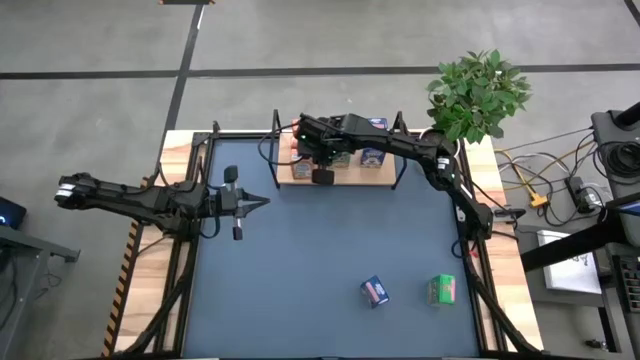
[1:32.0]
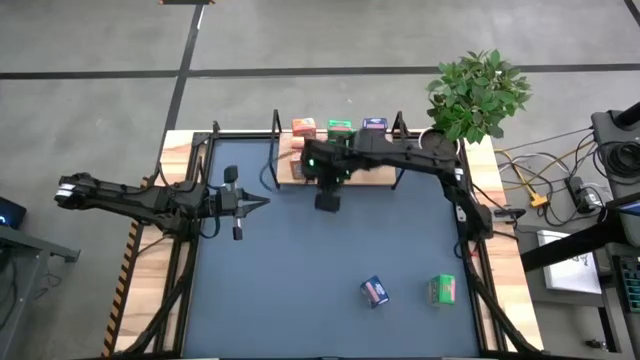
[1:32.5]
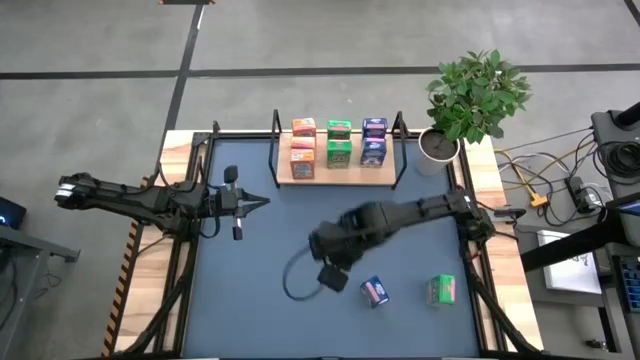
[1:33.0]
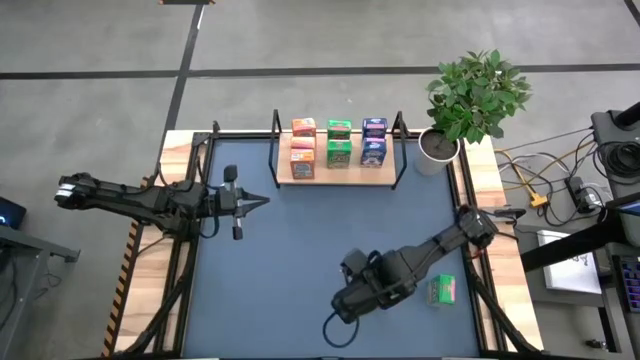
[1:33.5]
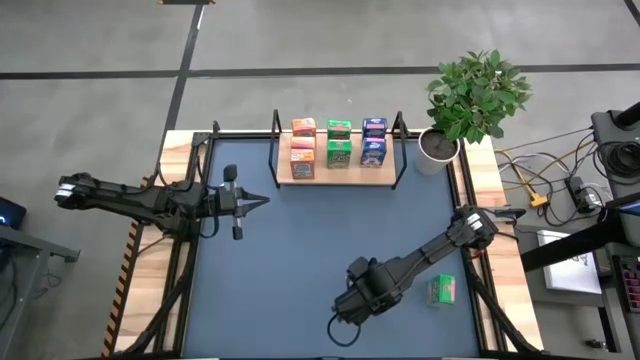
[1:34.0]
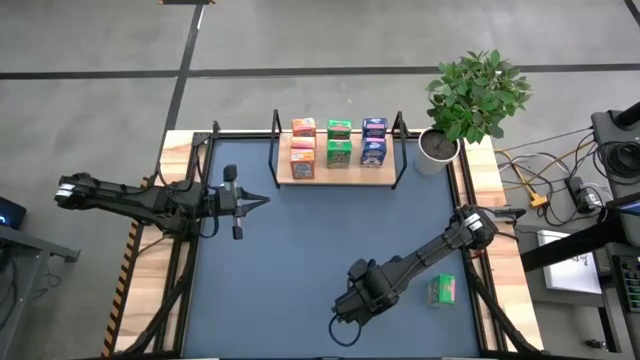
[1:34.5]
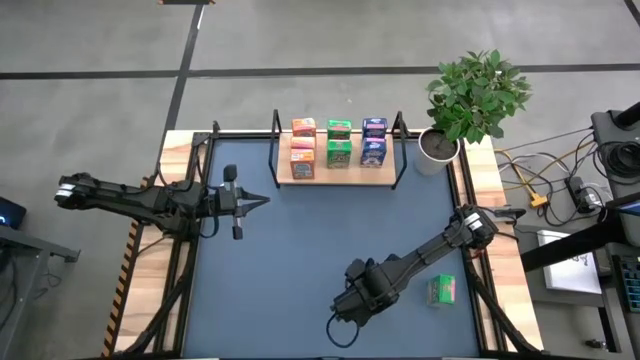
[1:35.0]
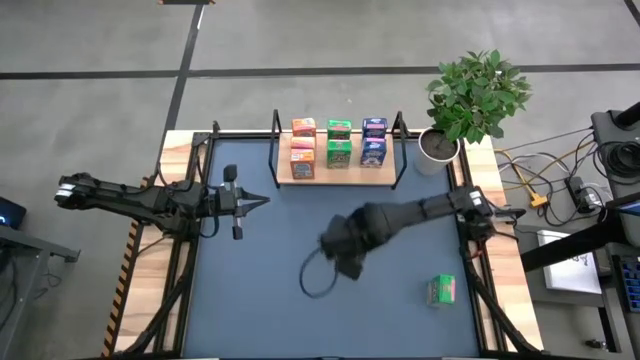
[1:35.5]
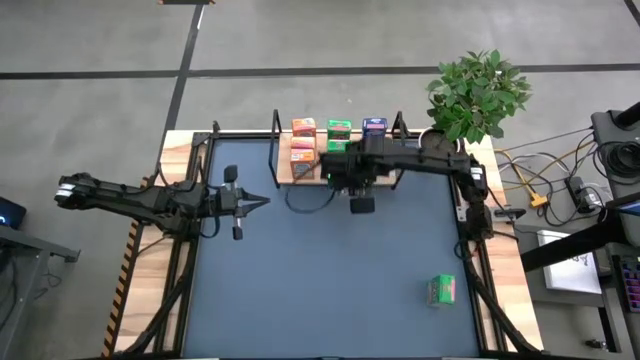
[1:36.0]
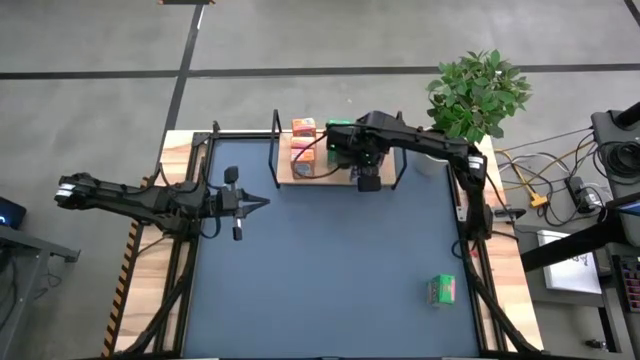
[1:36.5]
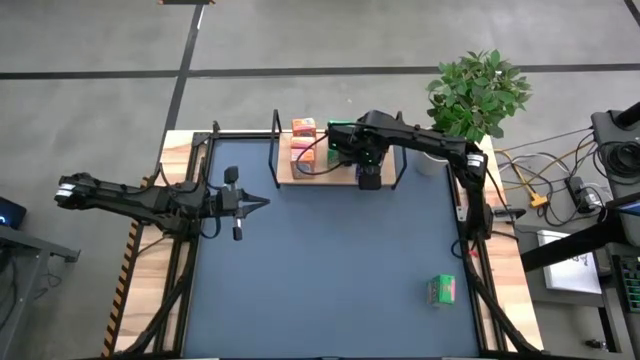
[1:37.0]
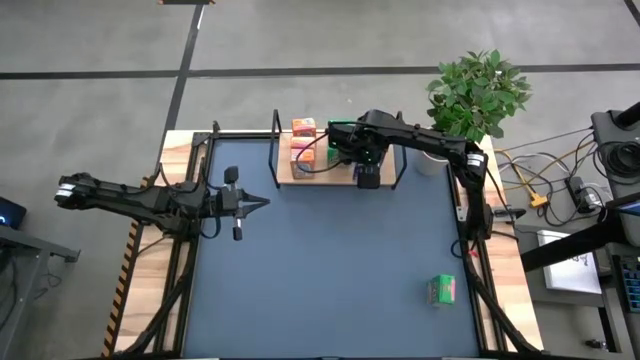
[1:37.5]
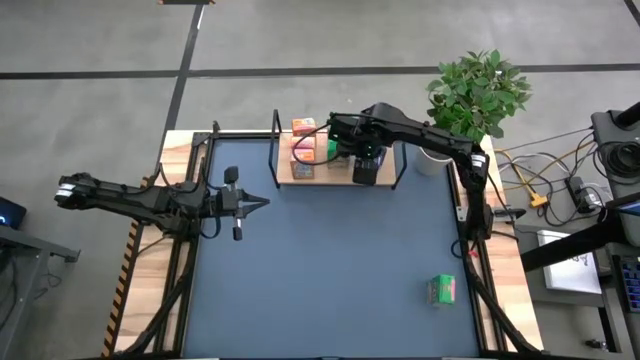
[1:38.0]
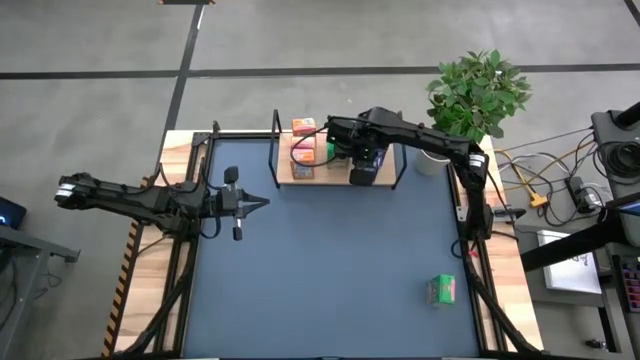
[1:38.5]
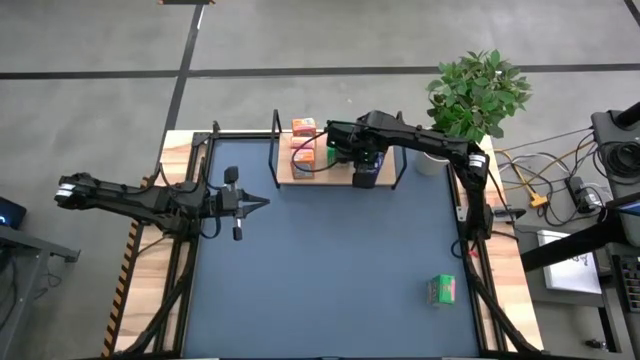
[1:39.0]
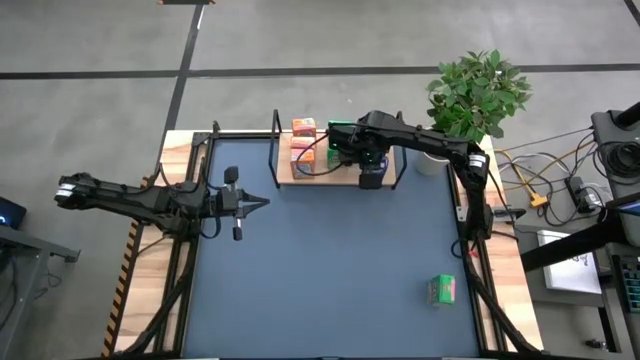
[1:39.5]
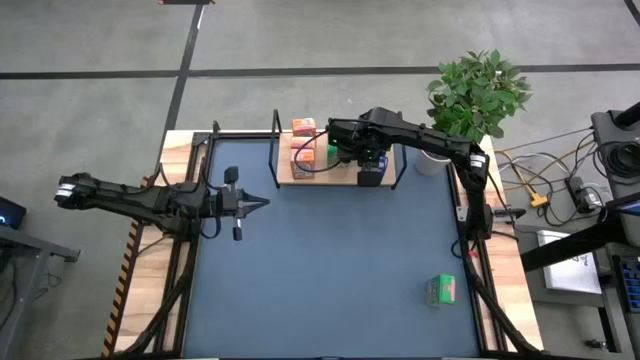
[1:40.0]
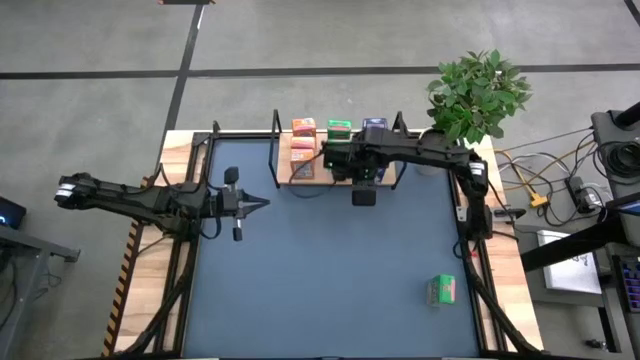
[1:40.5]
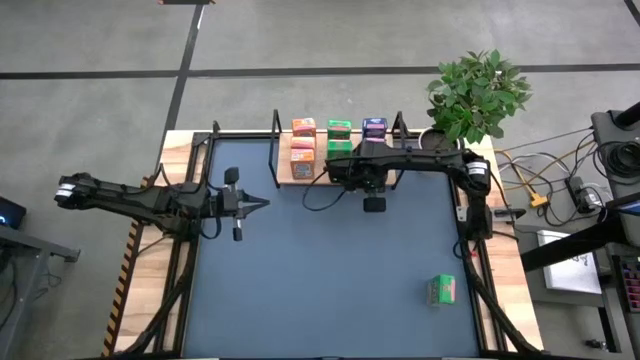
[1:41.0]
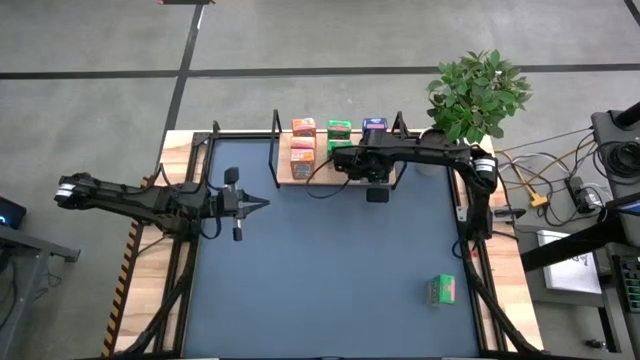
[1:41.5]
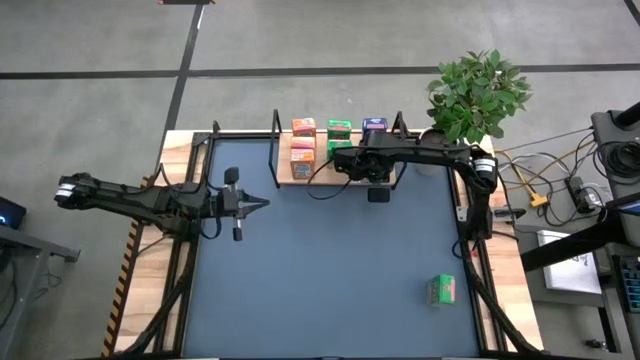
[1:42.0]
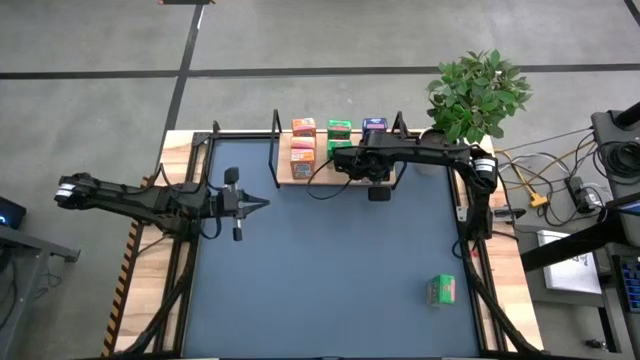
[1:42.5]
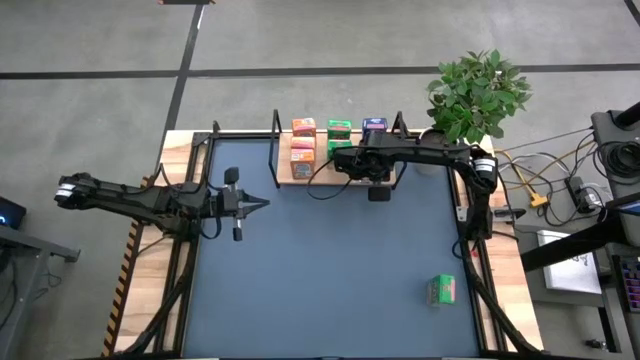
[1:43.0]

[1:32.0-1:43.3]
Task: Stack cereal on shelf
Put the blue cereal box on the shelf

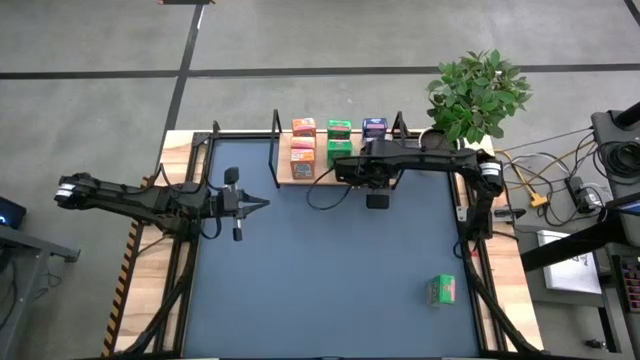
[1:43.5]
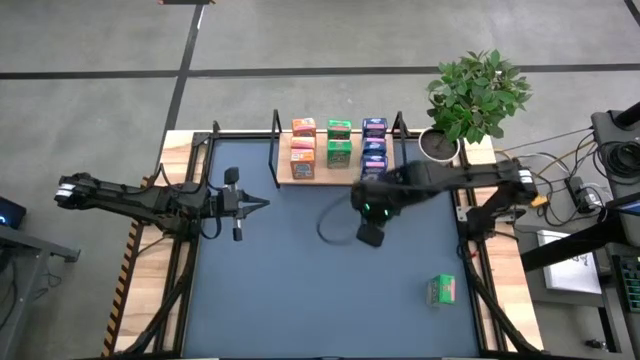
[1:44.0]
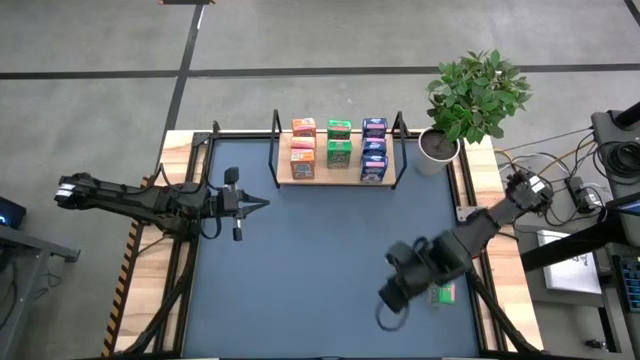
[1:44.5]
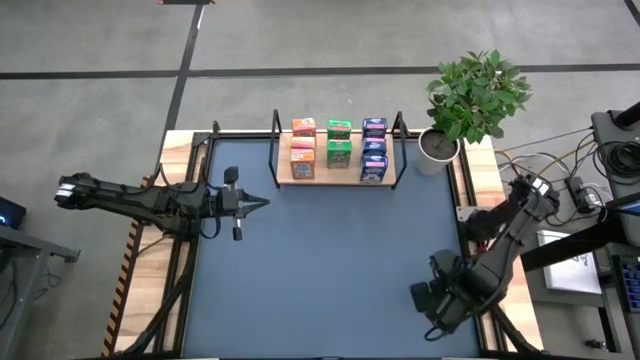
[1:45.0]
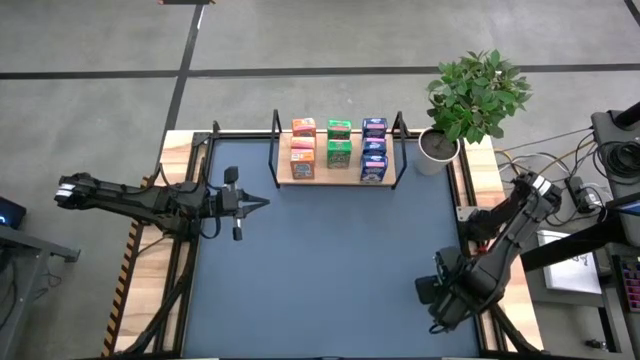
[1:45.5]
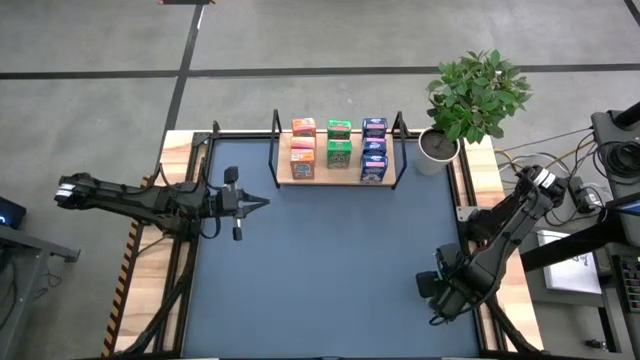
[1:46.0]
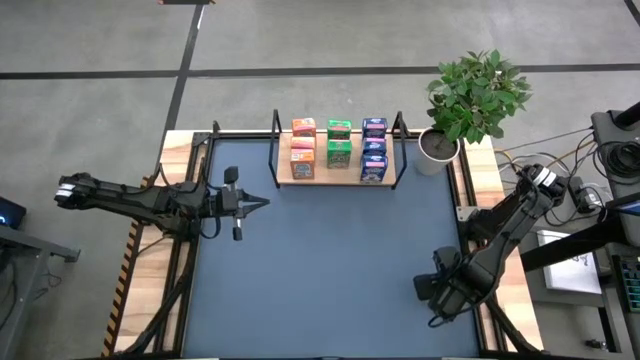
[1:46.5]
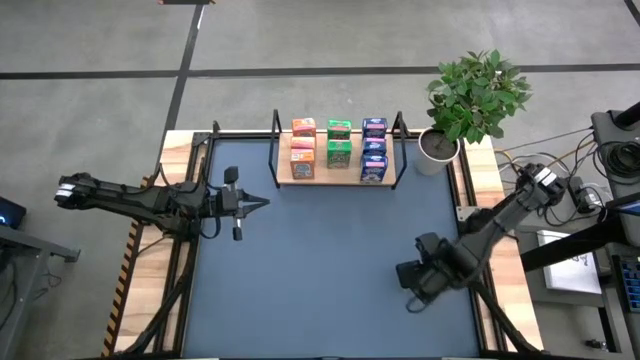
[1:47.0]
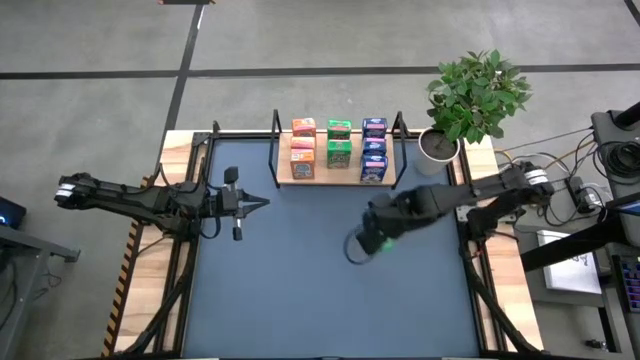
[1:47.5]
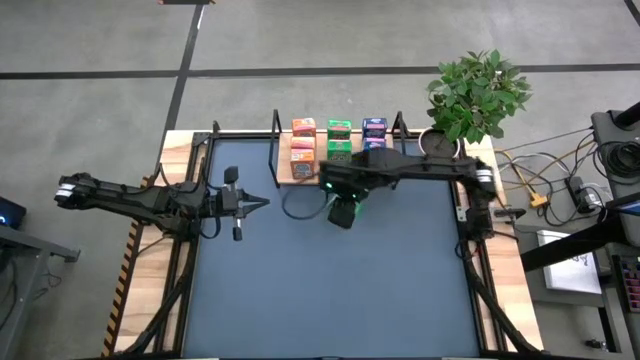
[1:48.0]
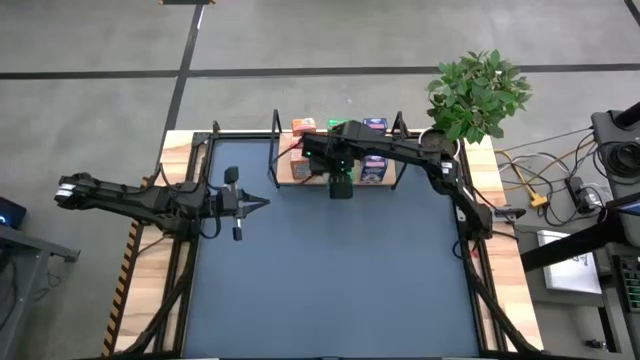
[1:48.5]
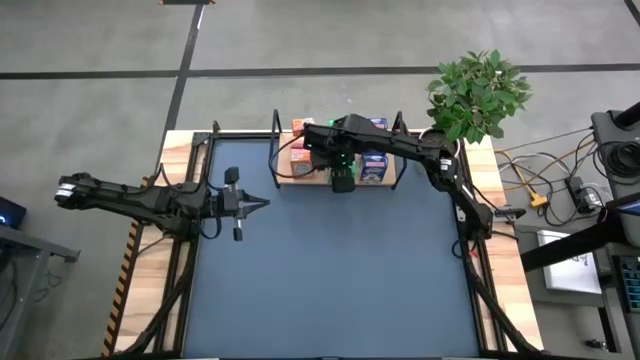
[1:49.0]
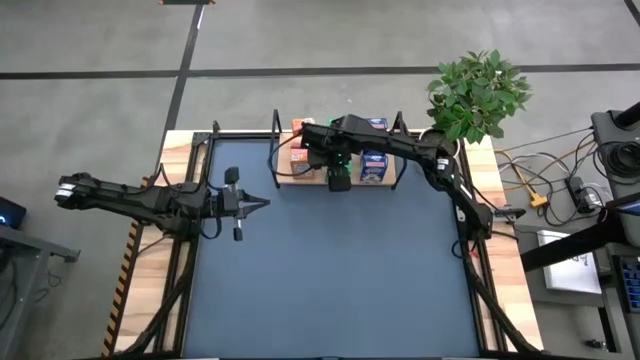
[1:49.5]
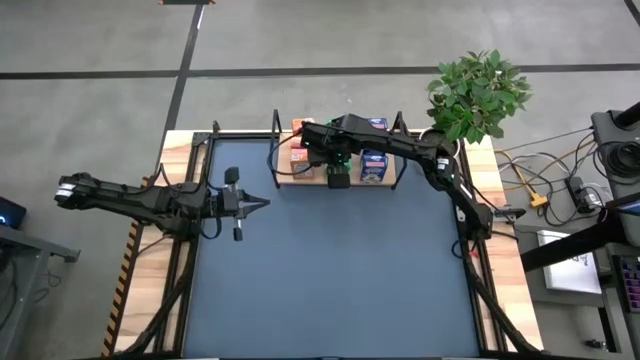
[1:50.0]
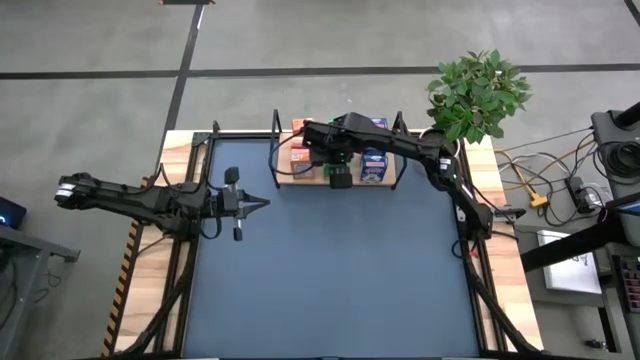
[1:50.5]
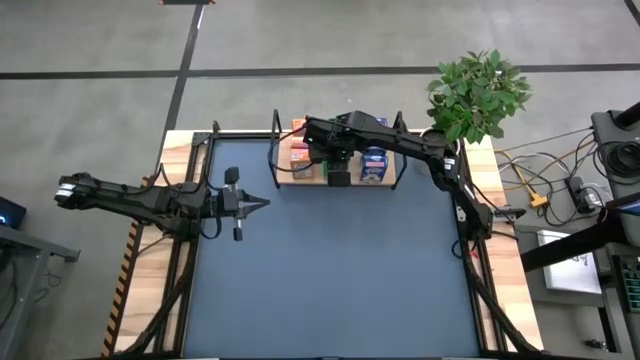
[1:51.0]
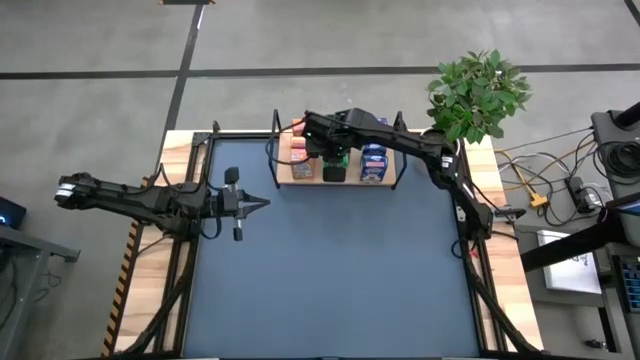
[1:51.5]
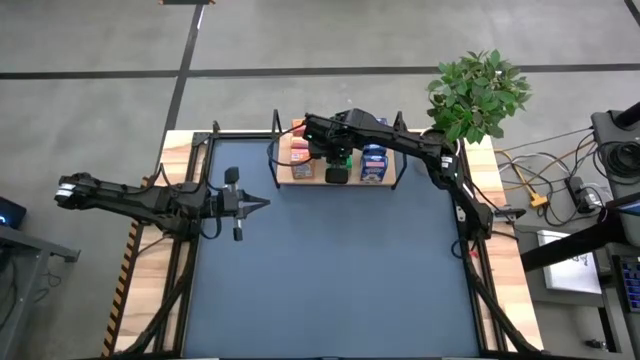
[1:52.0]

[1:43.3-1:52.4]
Put the green cereal box on the shelf

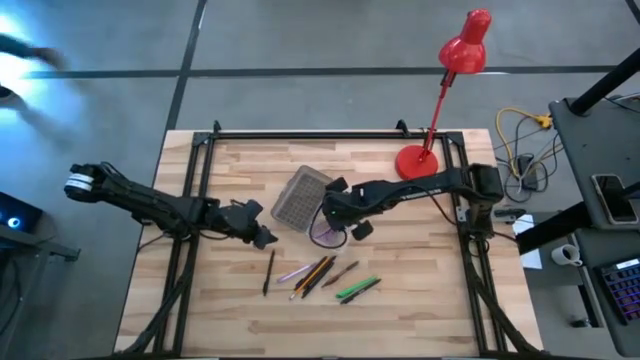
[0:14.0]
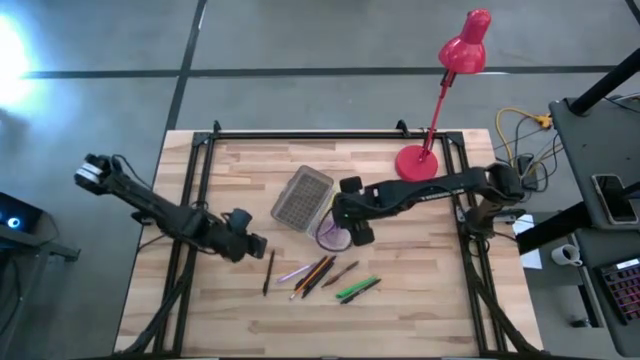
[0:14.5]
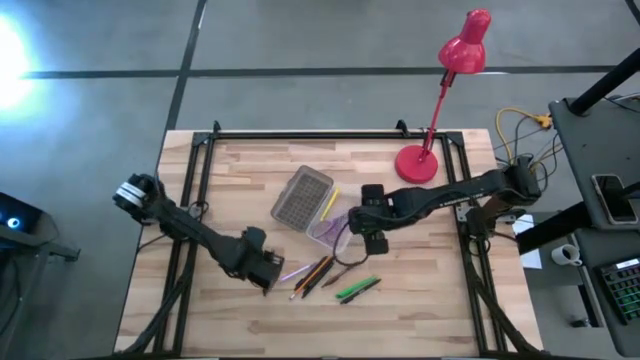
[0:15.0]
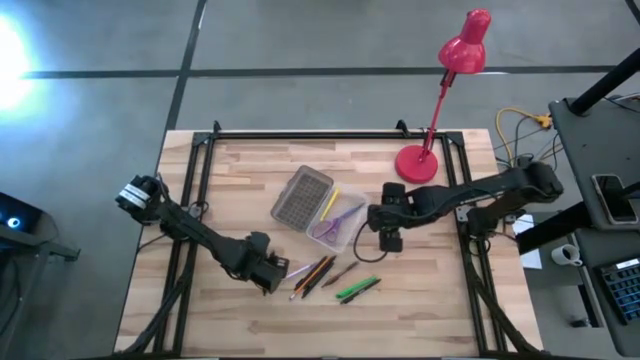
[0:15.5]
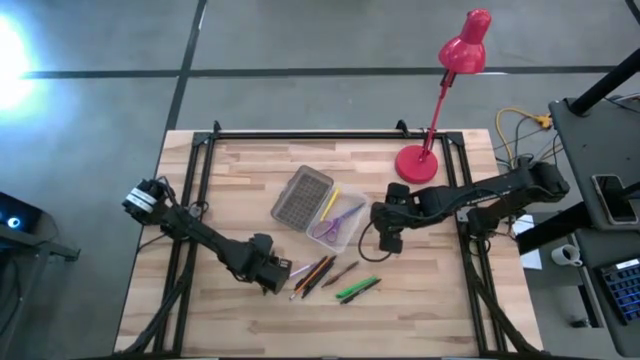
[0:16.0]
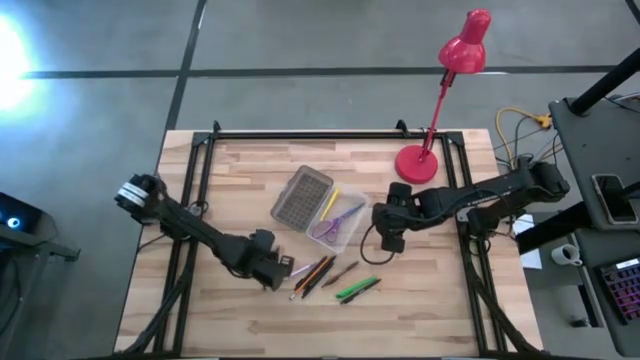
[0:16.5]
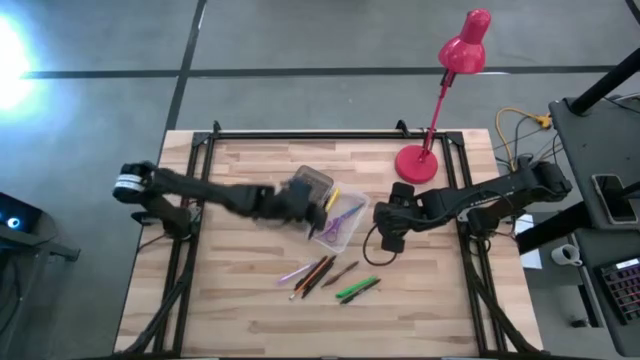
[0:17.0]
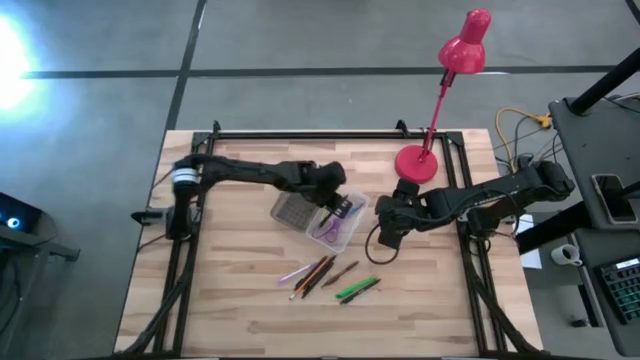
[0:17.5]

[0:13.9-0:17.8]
Task: Pick & place school supplies into a supply box
Put the black pen into the gray supply box
